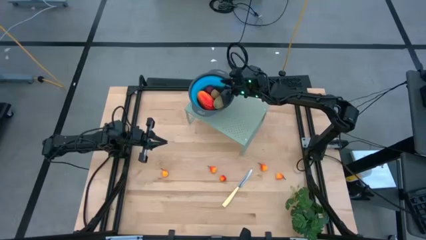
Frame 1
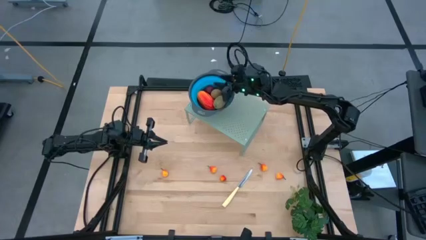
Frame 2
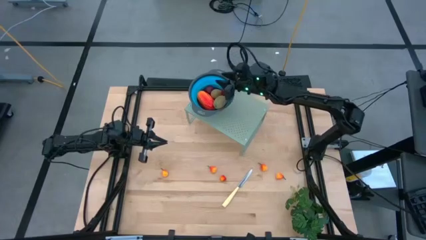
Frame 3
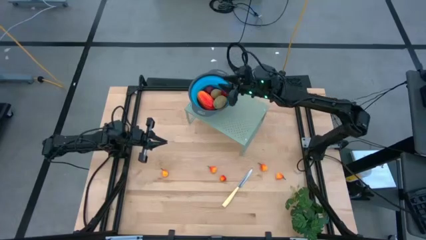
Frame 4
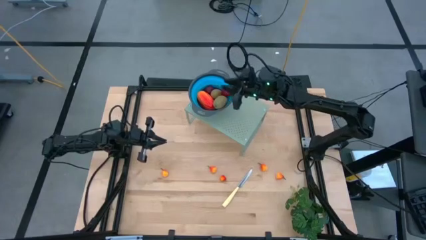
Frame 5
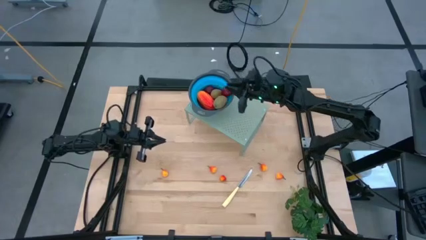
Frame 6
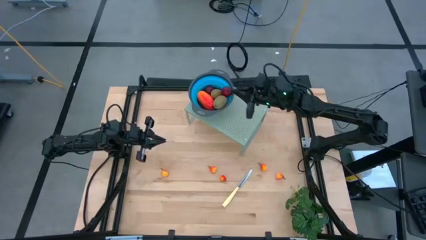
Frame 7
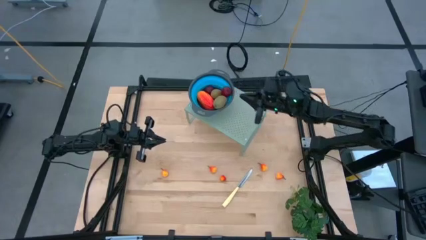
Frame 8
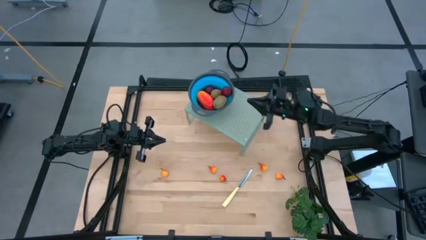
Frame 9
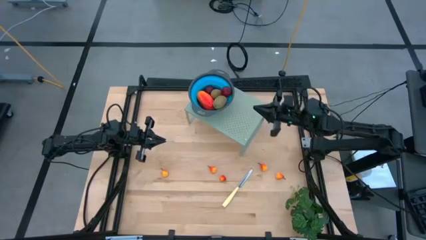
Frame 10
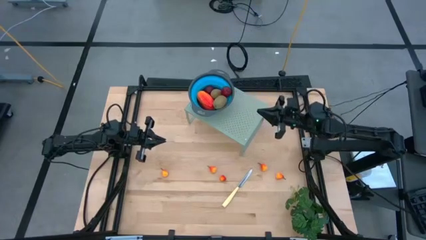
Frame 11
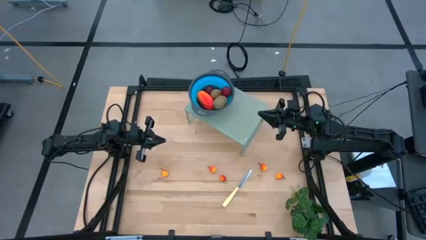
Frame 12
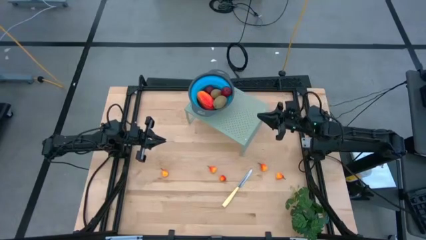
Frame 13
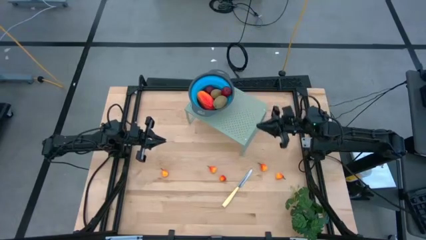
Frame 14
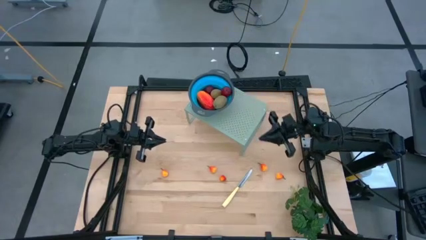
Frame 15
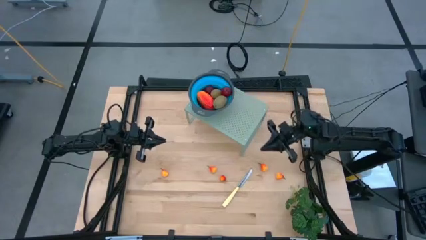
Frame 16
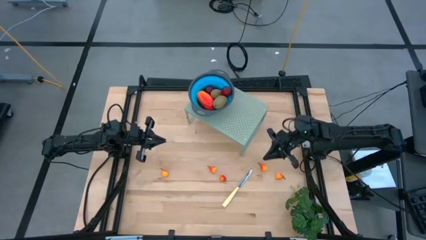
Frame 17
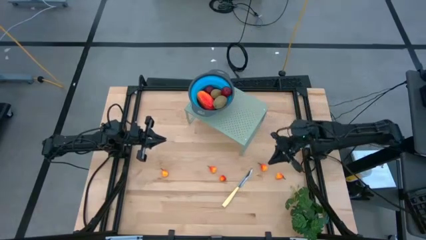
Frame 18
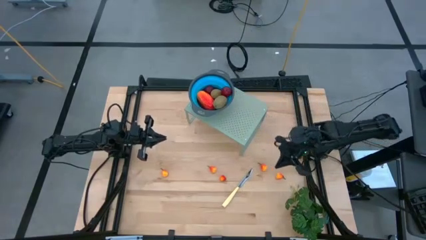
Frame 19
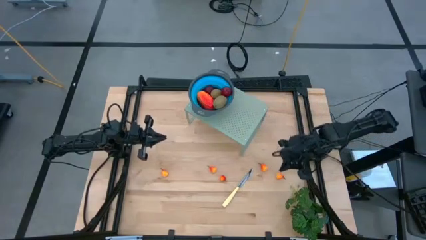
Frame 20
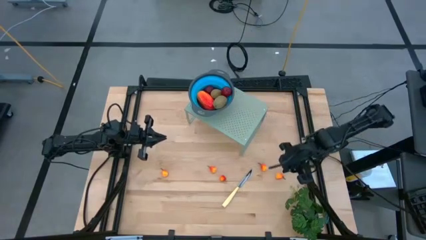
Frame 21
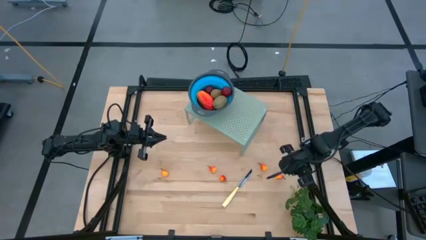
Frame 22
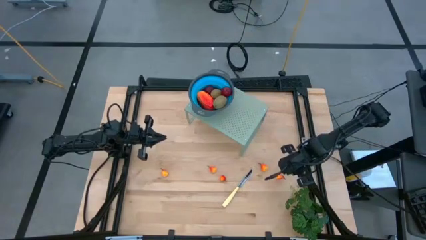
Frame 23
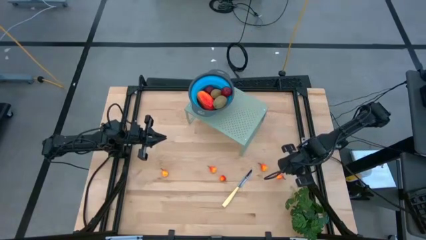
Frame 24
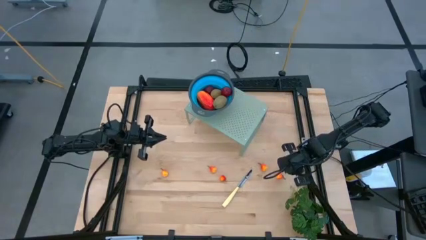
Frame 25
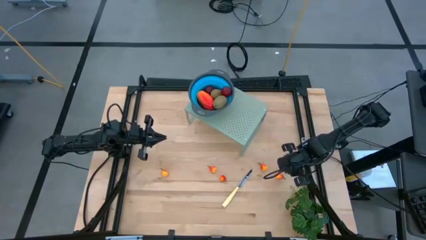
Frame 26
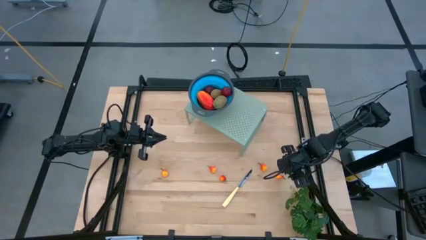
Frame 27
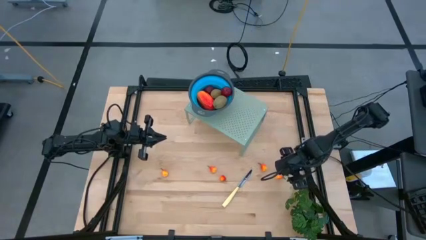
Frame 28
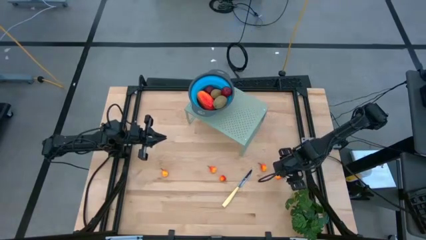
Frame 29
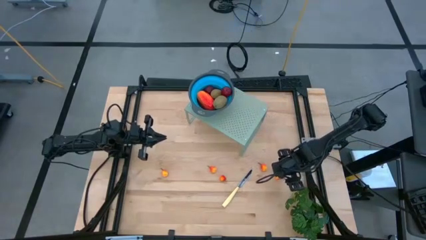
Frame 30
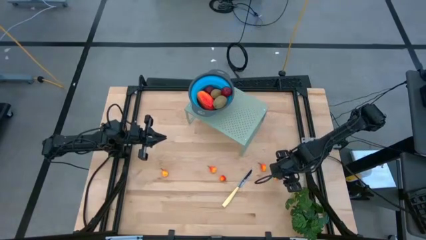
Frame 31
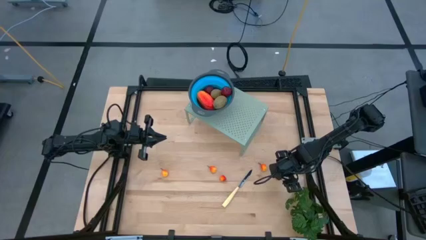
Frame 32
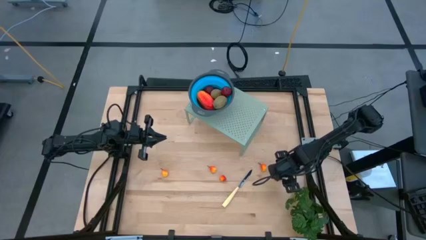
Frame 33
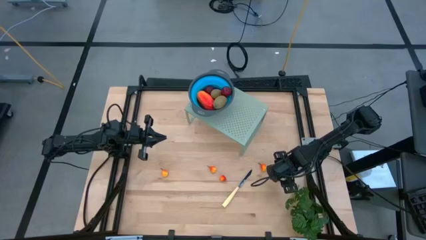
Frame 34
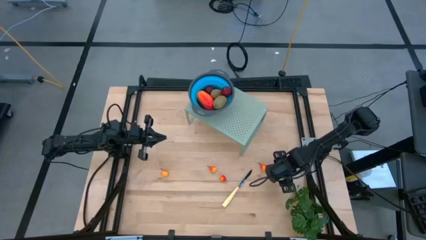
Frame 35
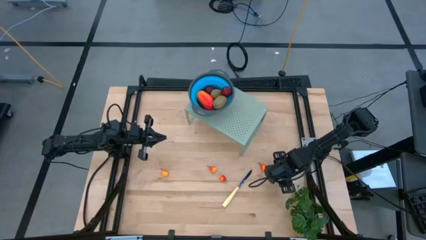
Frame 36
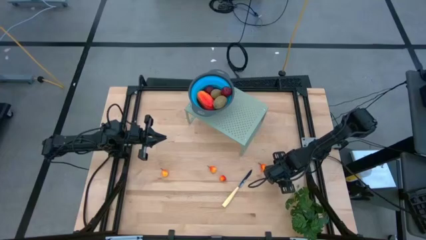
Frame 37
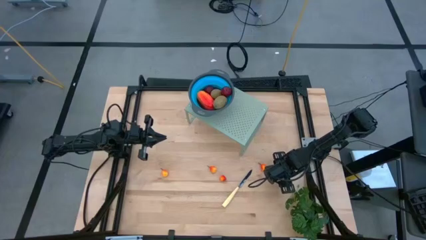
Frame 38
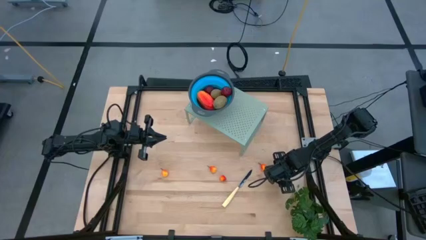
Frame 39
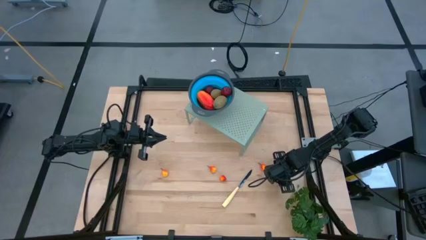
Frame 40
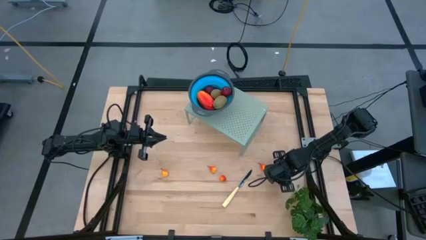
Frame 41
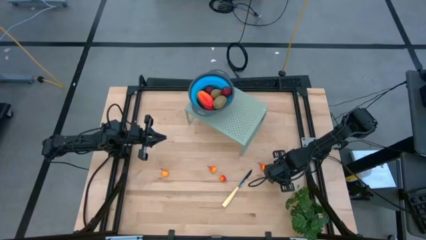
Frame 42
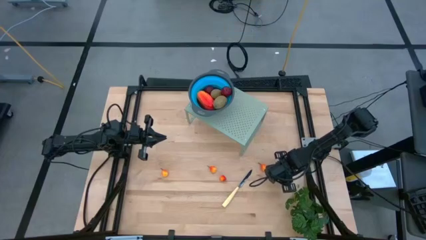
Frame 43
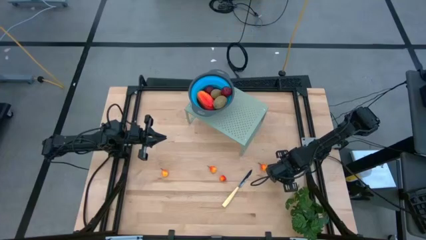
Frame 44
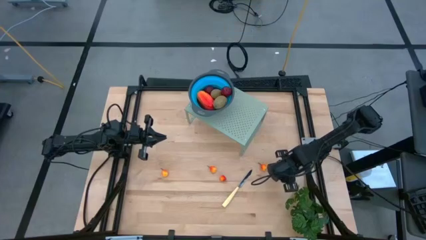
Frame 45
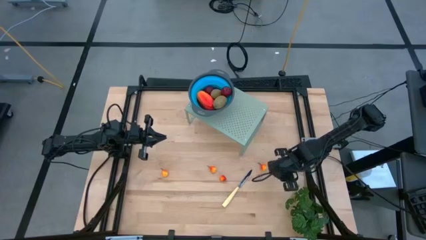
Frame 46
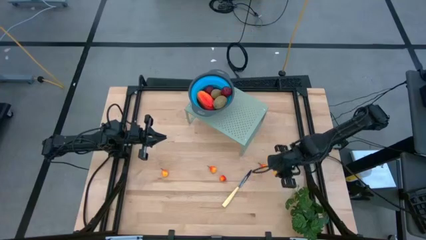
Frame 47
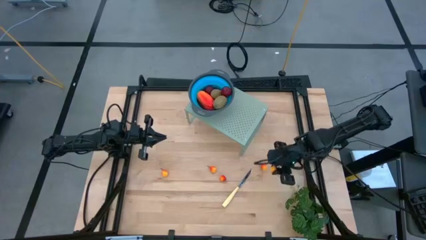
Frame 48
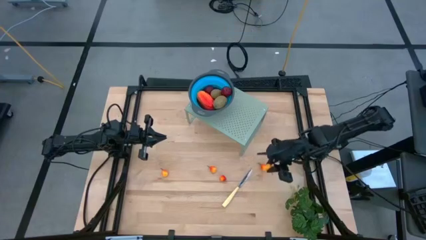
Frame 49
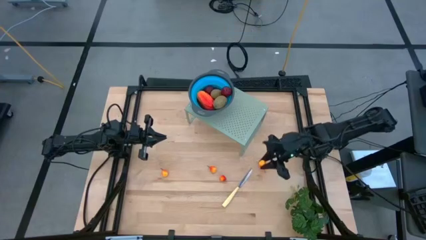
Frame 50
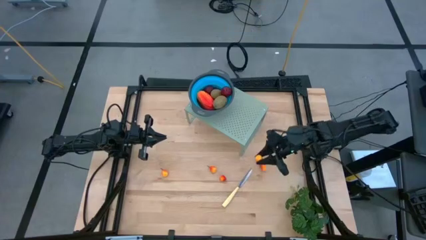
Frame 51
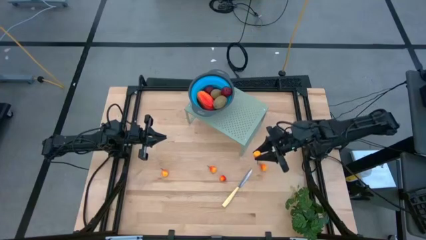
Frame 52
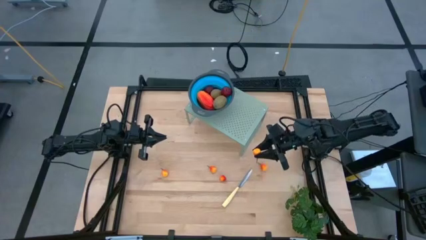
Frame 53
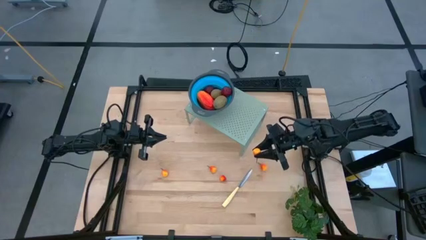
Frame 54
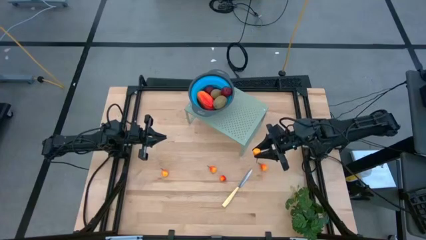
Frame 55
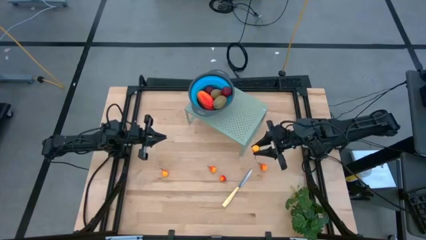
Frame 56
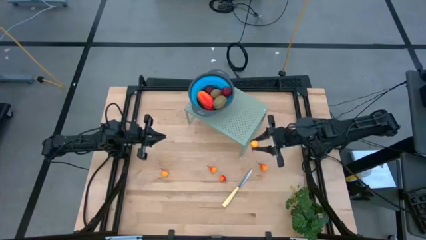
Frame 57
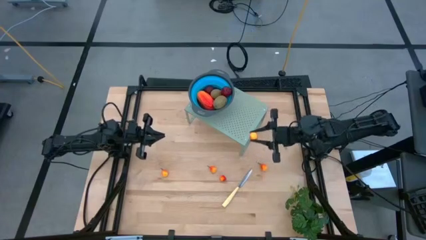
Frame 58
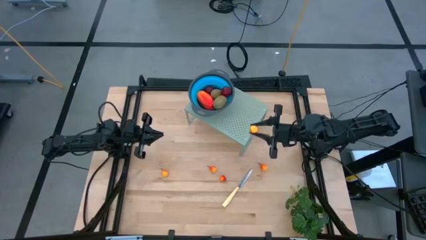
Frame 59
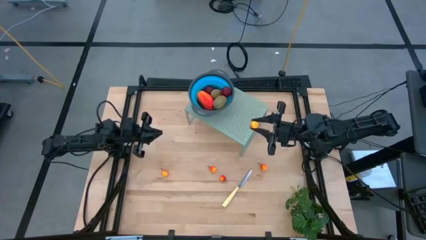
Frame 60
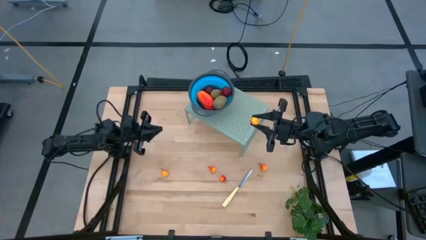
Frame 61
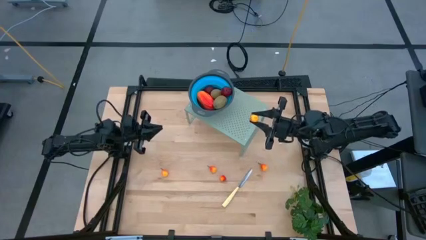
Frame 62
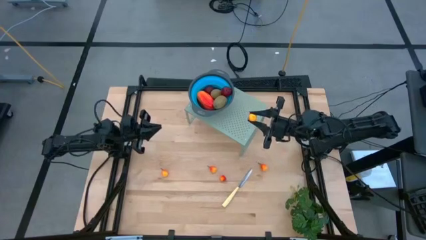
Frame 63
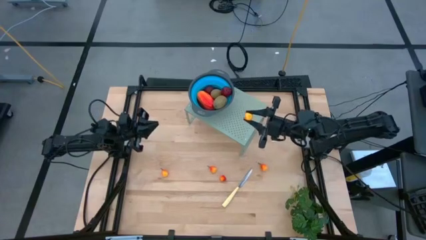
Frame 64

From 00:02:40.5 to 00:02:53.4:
Task: Pick & Place Fruit
Put the peach into the blue strainer bowl on the shelf
